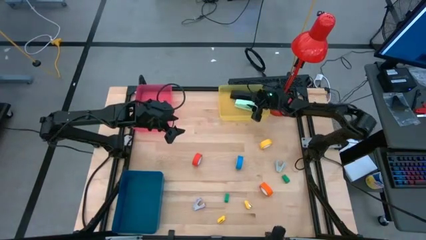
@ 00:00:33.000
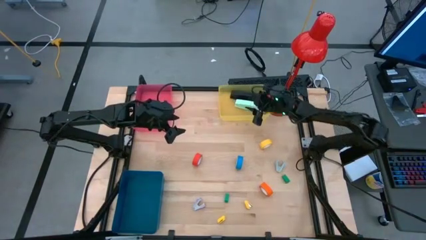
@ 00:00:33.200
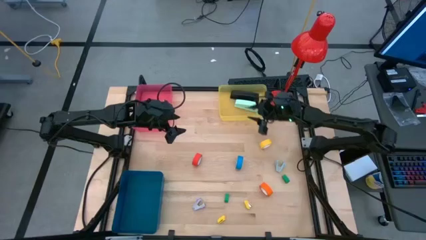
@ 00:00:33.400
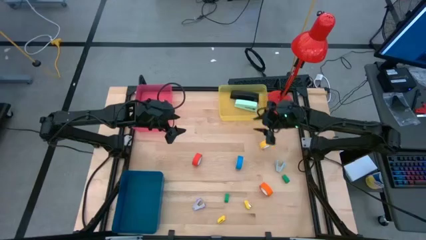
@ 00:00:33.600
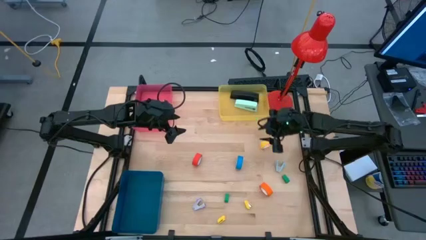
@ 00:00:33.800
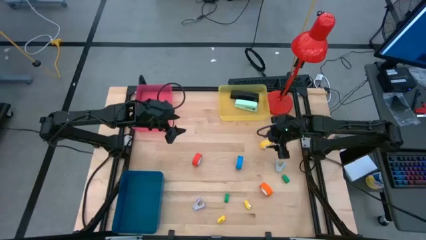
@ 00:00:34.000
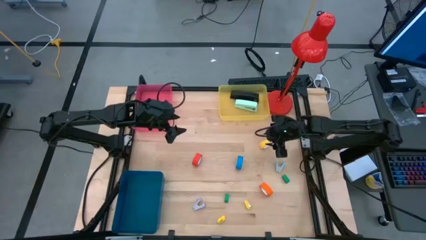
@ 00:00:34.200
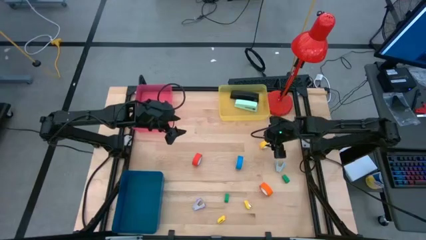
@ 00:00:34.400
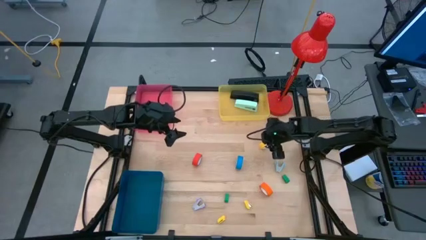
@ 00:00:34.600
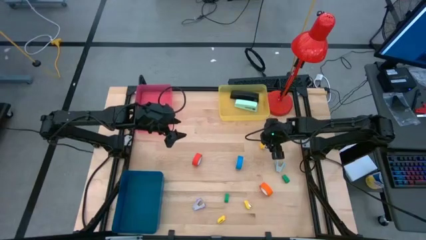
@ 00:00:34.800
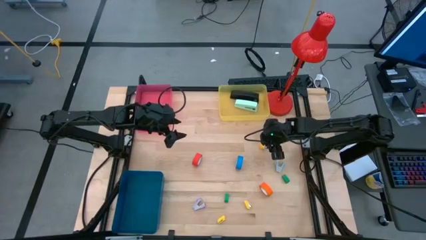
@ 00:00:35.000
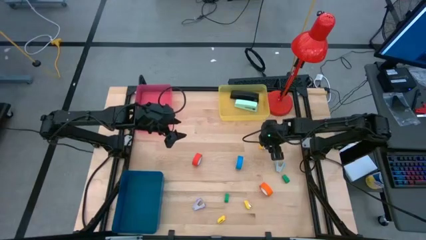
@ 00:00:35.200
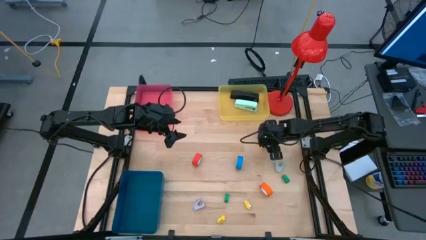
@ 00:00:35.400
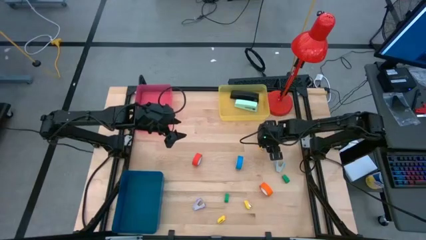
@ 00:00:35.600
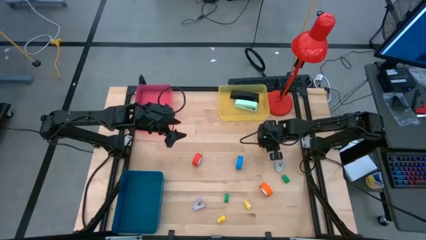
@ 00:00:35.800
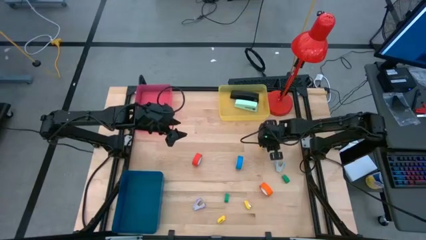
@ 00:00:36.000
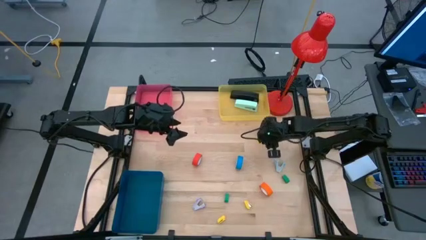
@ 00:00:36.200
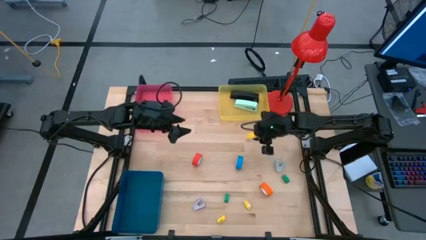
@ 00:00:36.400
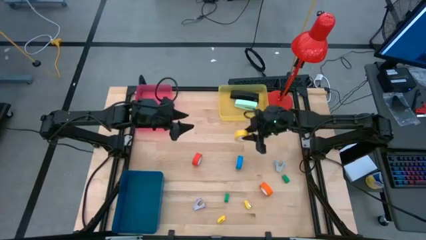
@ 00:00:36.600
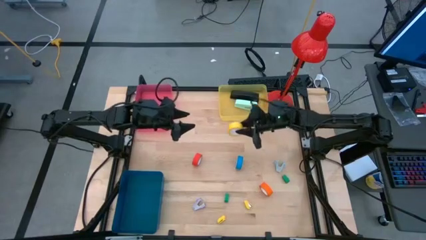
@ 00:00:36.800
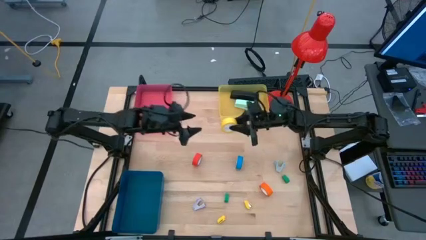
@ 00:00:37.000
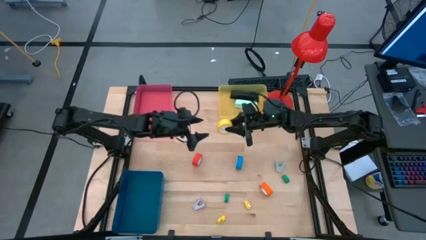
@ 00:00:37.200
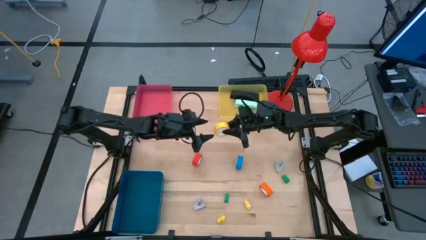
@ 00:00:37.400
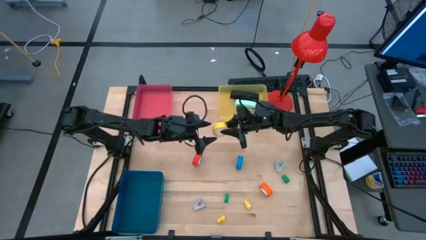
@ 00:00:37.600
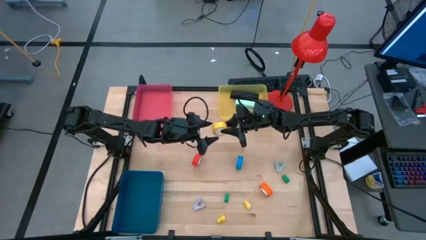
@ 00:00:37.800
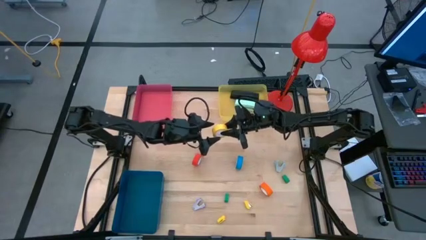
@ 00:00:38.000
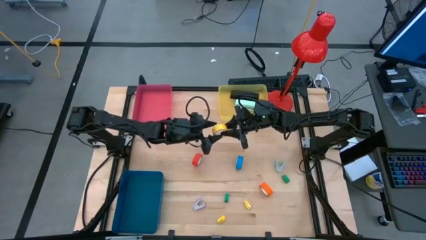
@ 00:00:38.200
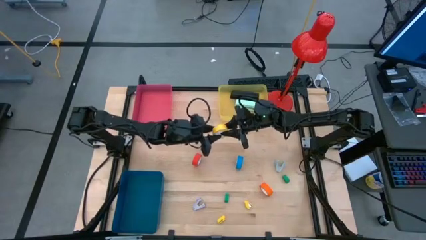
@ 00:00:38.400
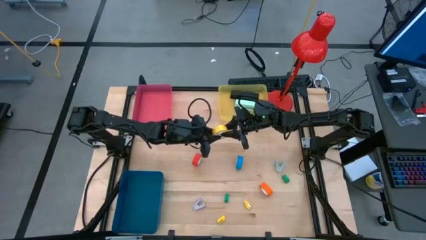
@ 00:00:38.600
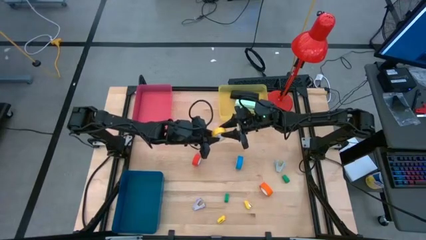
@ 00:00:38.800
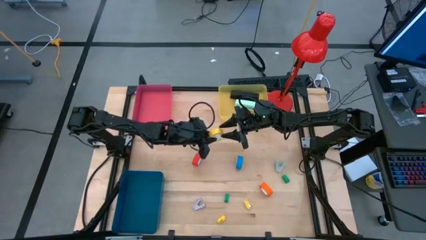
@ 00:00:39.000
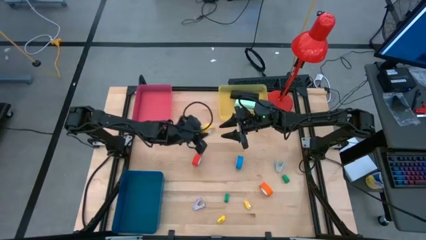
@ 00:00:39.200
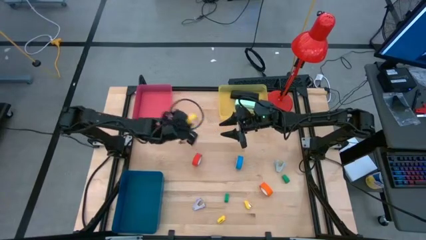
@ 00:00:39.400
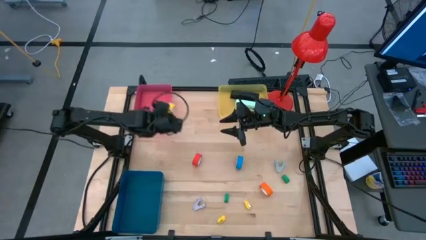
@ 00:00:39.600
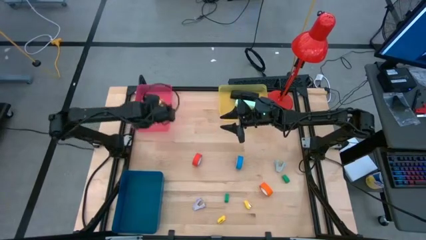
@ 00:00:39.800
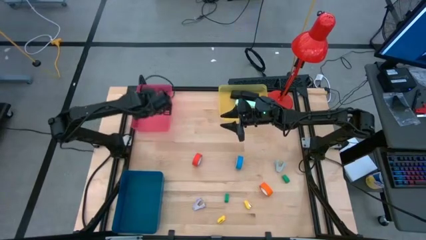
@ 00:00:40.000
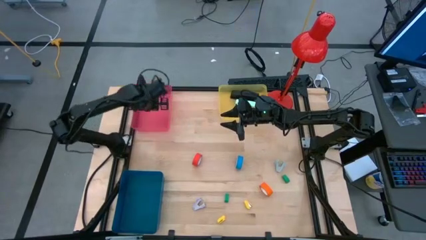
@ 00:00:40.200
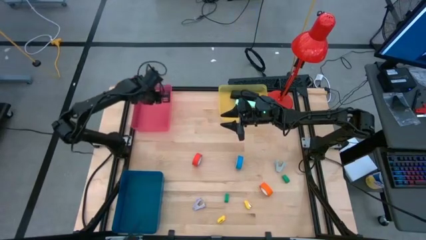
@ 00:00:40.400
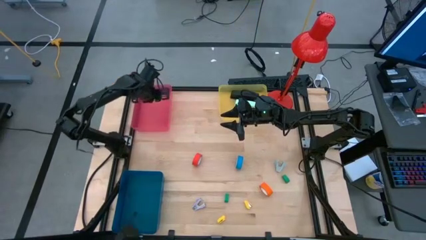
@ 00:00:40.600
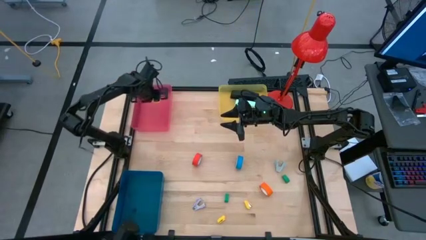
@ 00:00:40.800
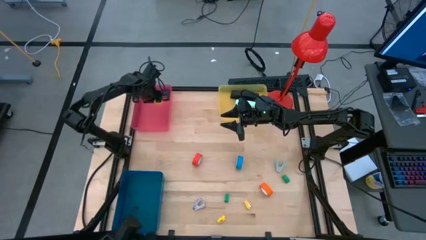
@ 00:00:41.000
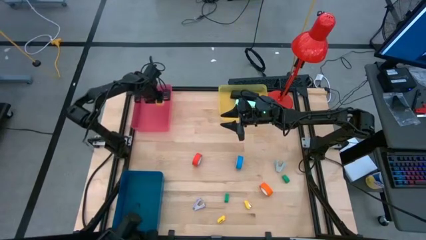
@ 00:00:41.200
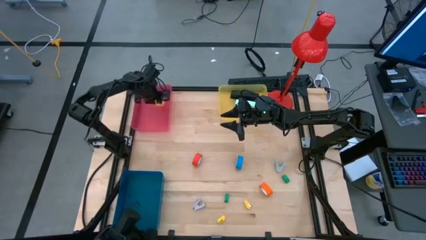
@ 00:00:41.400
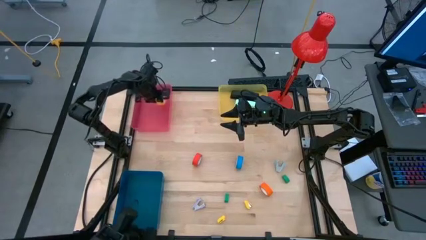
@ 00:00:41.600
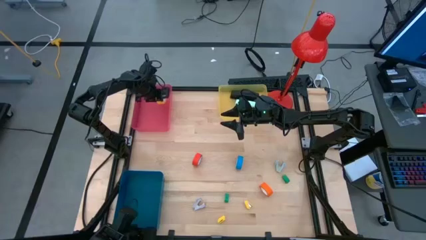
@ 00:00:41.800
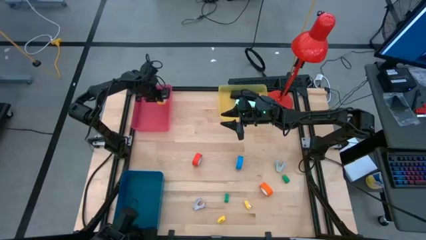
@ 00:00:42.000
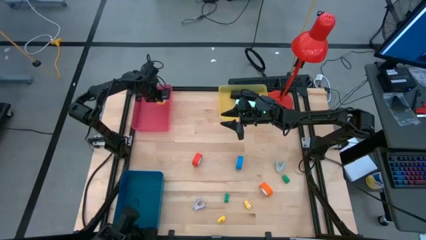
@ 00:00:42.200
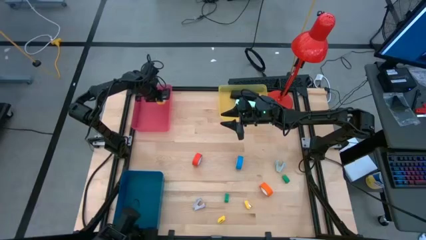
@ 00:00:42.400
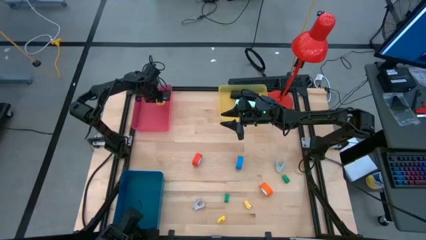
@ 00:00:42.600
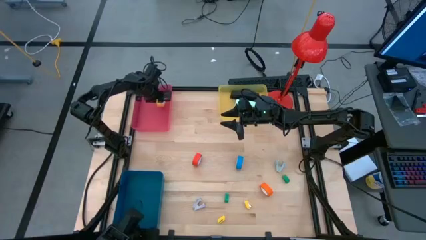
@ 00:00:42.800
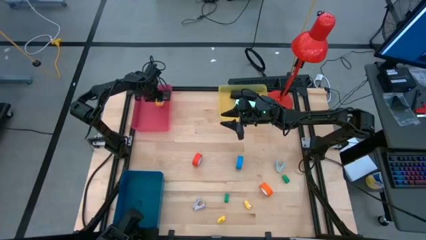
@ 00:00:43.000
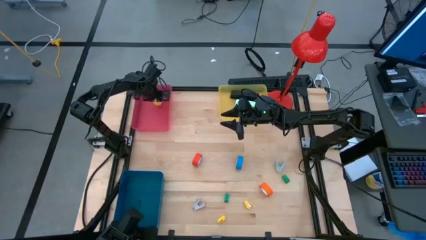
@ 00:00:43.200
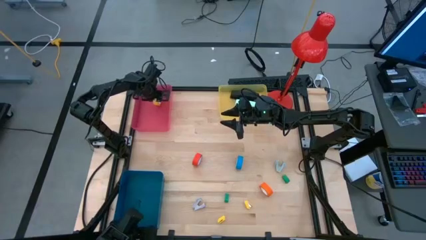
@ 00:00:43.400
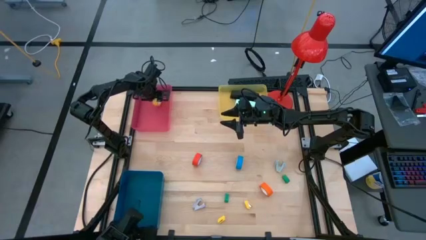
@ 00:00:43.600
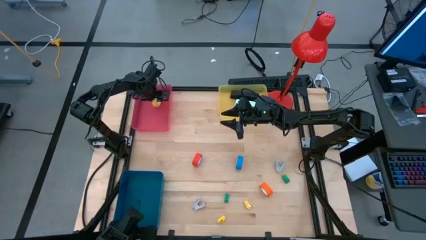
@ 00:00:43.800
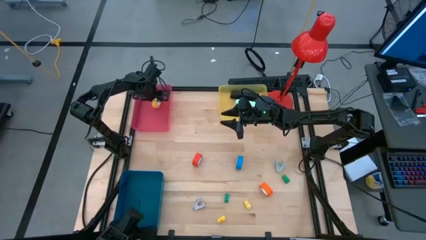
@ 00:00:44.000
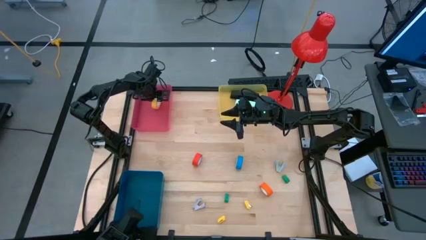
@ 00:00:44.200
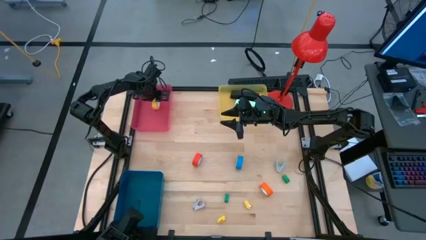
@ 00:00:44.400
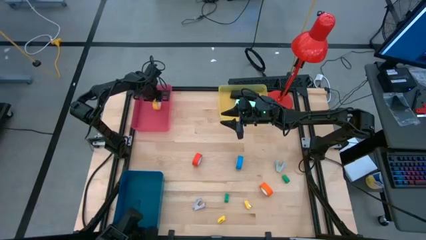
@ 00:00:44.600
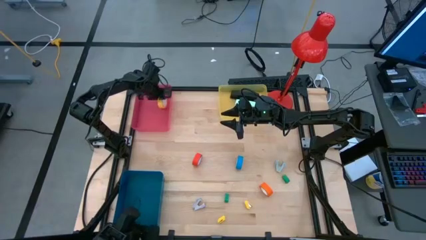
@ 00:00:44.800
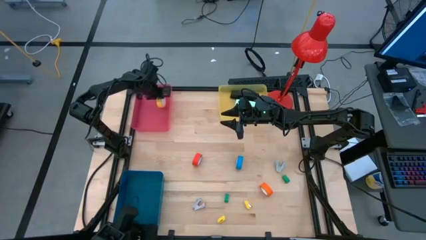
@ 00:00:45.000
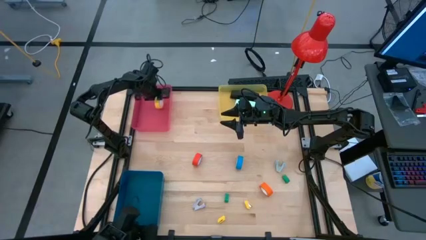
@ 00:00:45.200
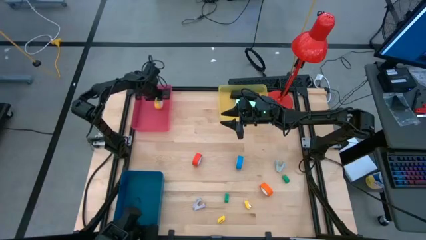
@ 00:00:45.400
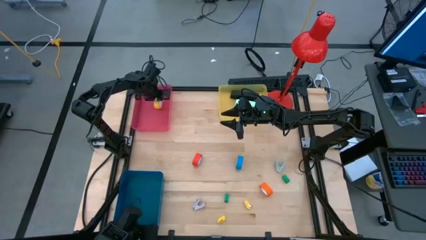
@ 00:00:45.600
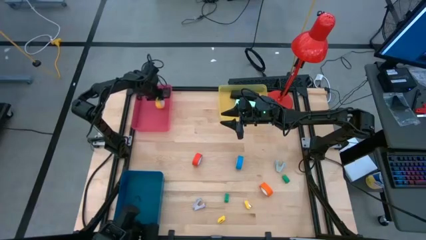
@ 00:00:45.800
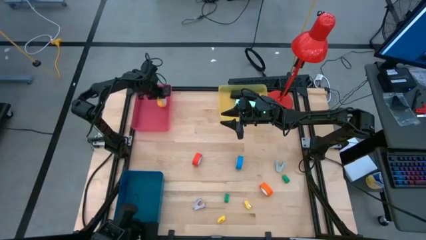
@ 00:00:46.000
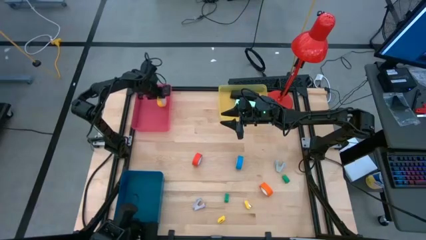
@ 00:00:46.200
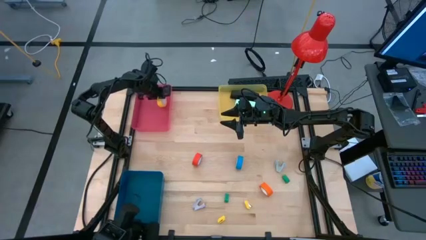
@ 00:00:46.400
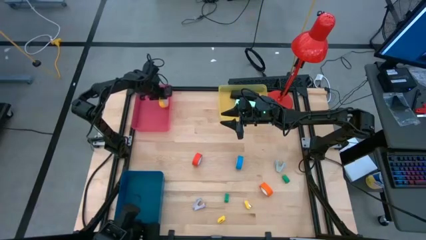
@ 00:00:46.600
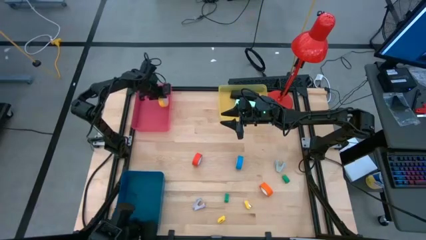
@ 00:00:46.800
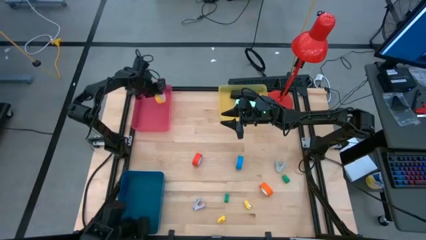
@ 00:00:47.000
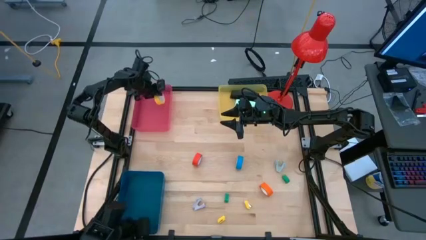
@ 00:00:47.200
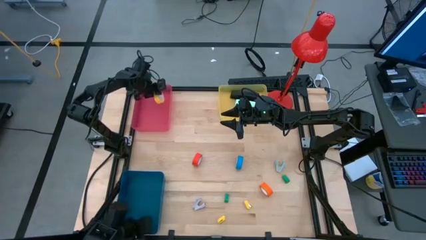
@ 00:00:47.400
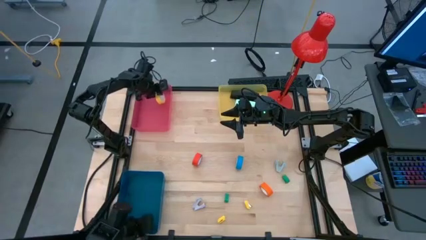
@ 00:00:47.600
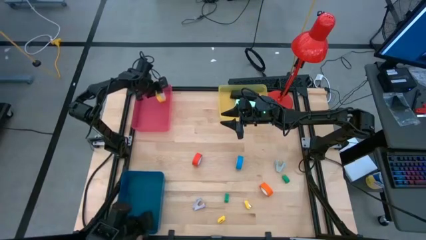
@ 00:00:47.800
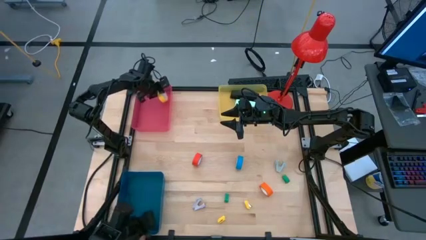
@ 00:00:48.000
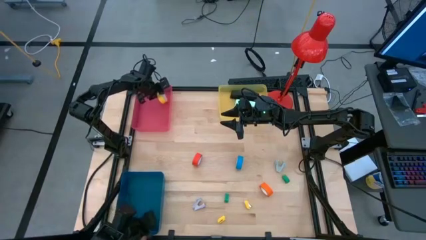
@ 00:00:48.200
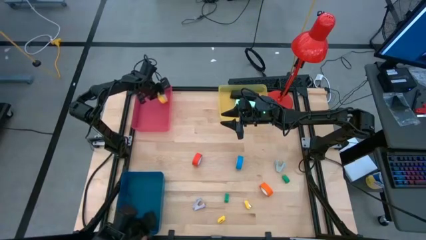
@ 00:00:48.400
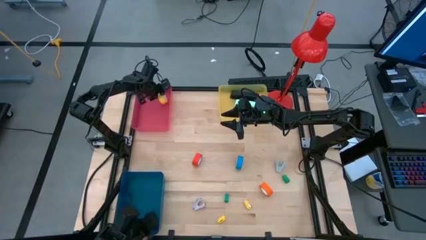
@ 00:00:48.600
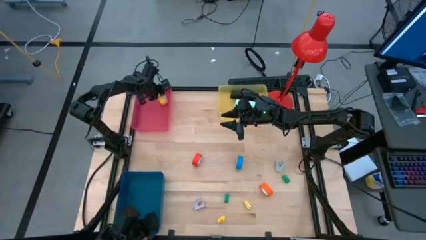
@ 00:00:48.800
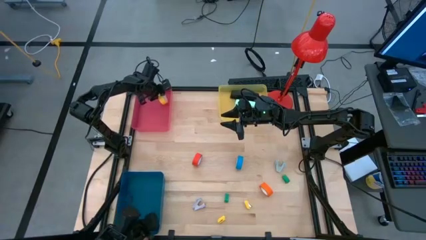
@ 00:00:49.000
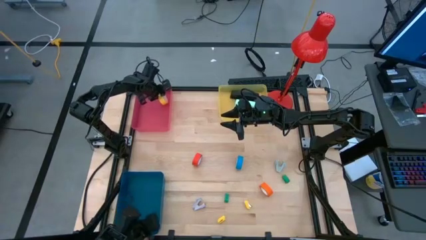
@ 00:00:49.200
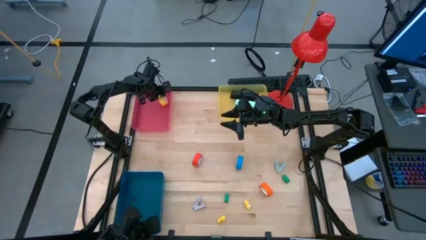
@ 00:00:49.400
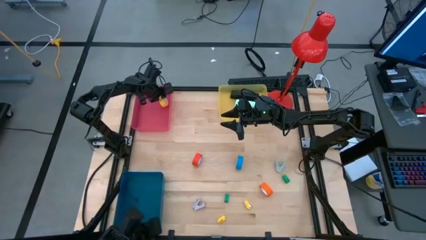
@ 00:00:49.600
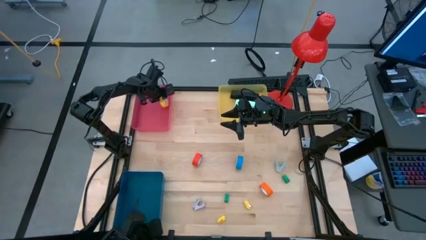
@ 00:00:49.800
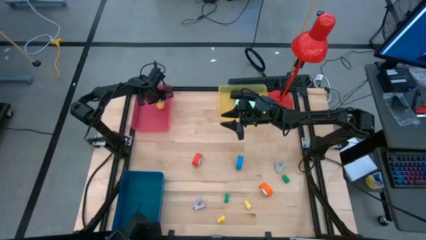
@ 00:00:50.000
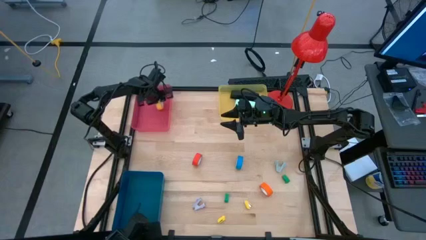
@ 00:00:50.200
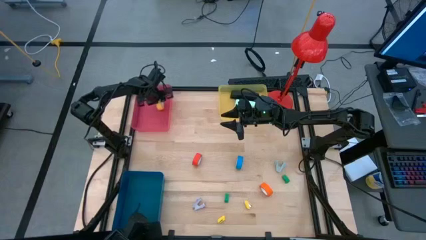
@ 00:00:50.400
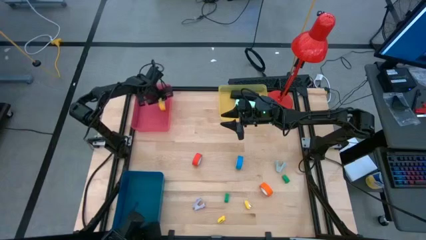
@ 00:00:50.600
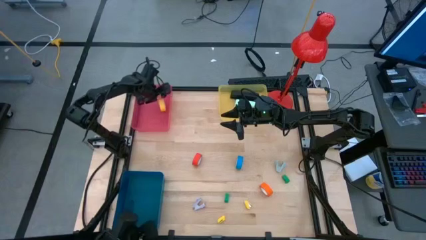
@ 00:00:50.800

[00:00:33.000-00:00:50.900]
Task: Pick and place Stapler, Stapler remover, tape
Put the yellow tape into the pink bin
